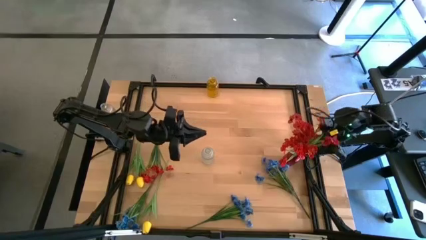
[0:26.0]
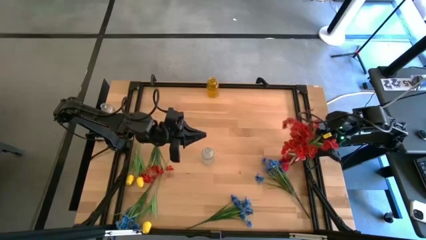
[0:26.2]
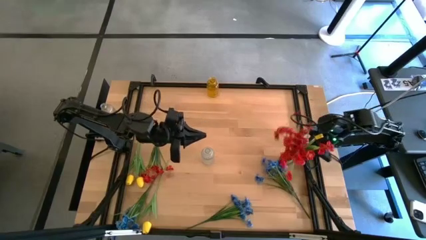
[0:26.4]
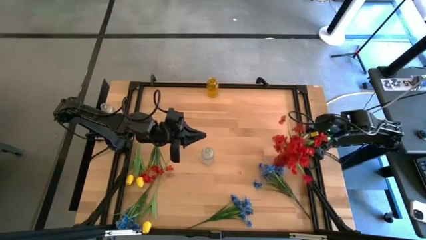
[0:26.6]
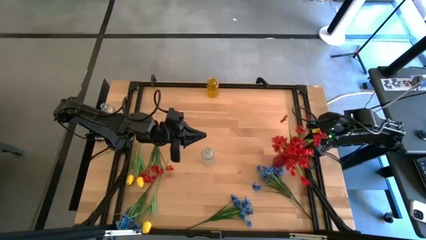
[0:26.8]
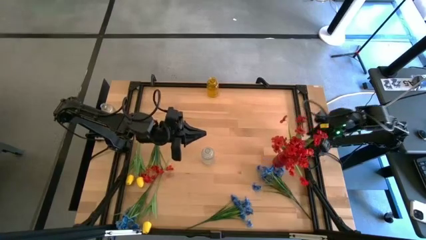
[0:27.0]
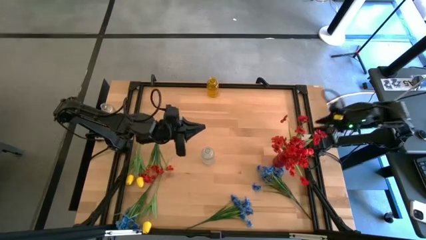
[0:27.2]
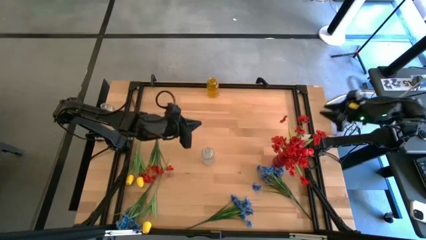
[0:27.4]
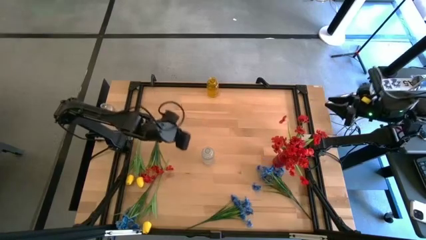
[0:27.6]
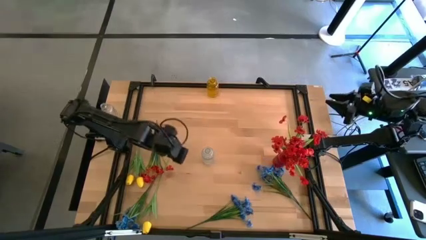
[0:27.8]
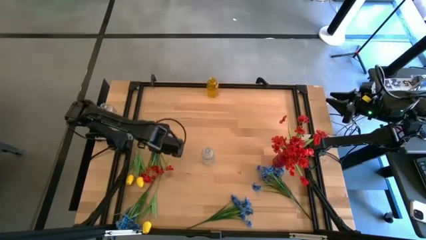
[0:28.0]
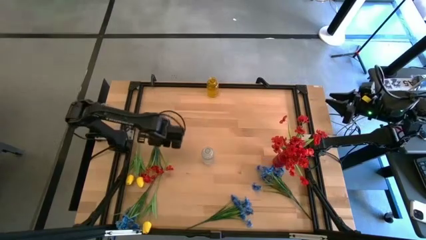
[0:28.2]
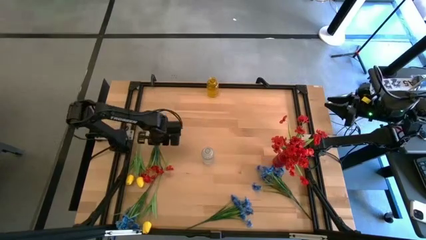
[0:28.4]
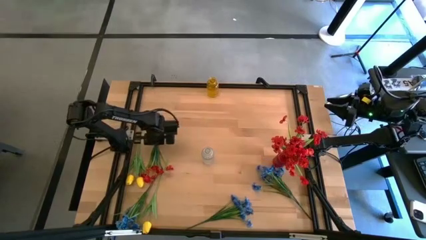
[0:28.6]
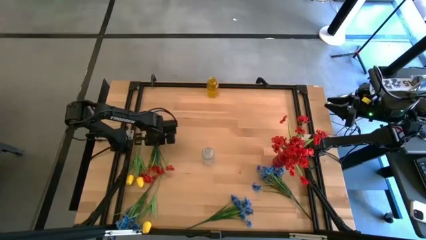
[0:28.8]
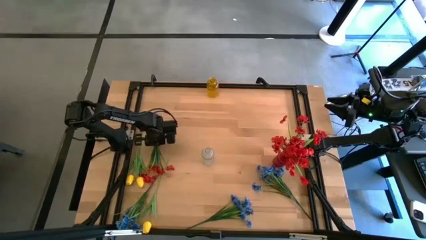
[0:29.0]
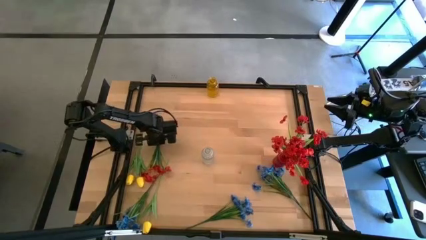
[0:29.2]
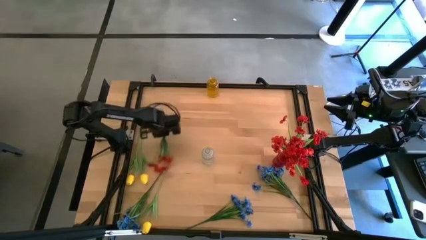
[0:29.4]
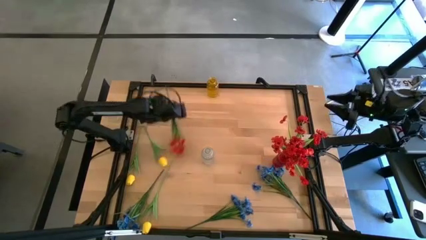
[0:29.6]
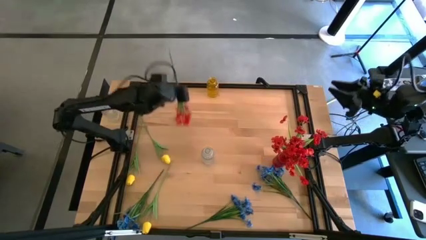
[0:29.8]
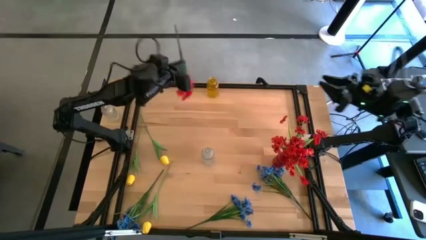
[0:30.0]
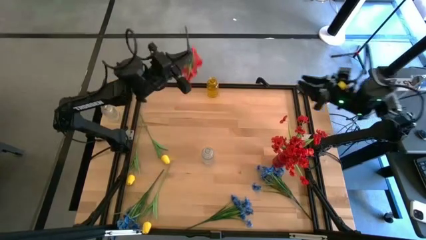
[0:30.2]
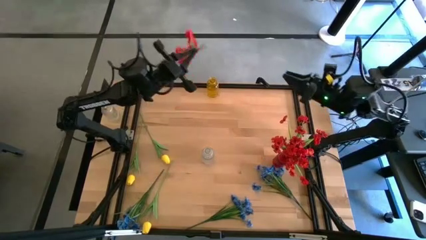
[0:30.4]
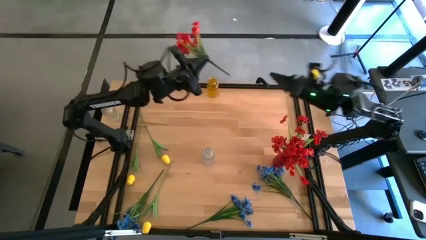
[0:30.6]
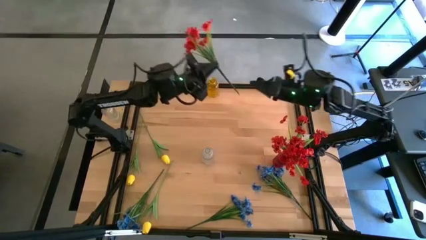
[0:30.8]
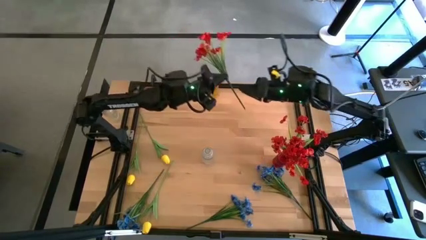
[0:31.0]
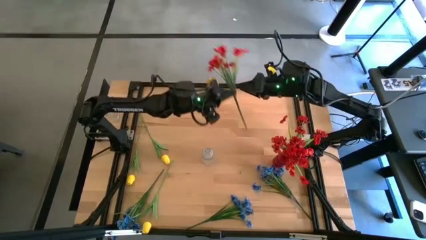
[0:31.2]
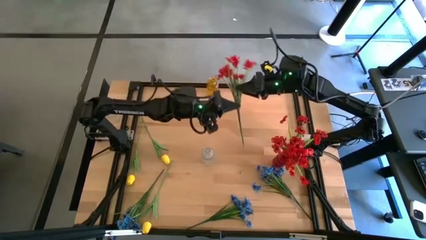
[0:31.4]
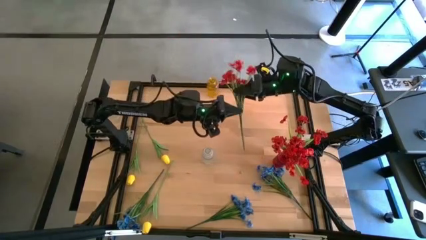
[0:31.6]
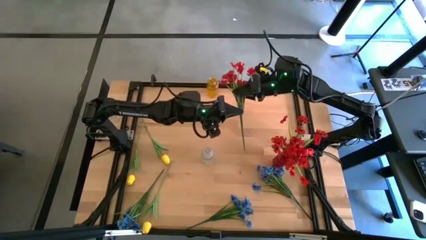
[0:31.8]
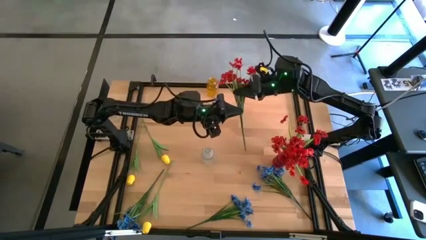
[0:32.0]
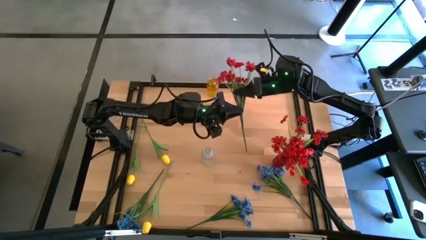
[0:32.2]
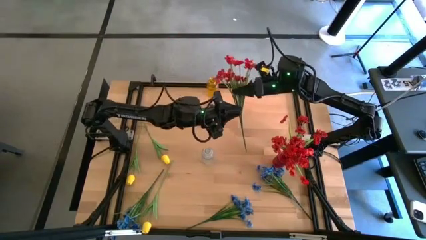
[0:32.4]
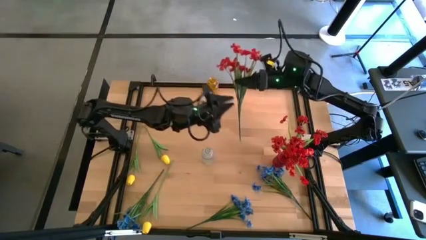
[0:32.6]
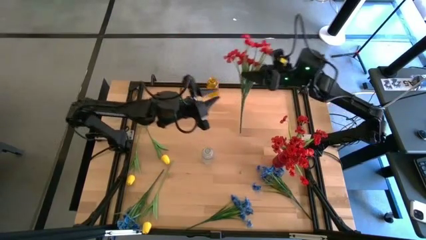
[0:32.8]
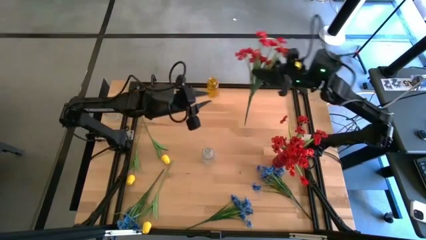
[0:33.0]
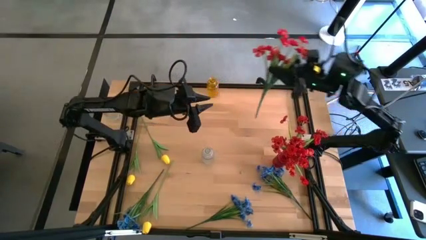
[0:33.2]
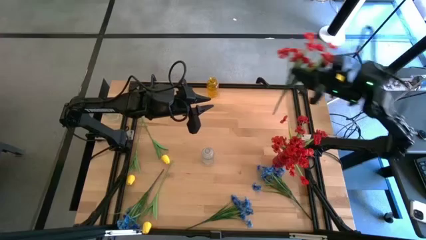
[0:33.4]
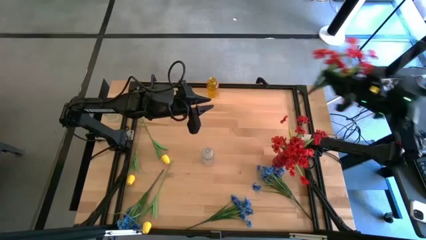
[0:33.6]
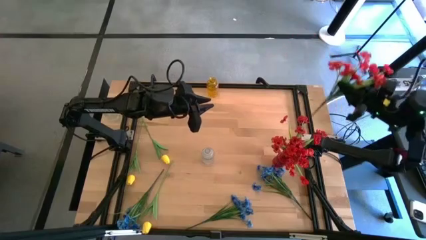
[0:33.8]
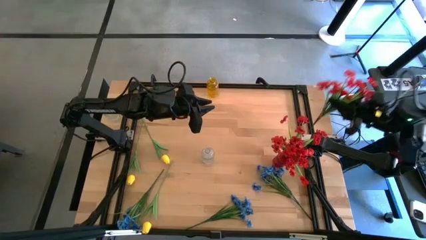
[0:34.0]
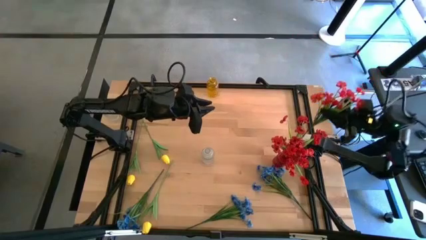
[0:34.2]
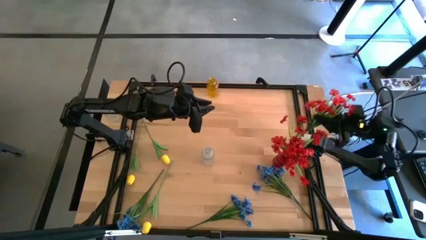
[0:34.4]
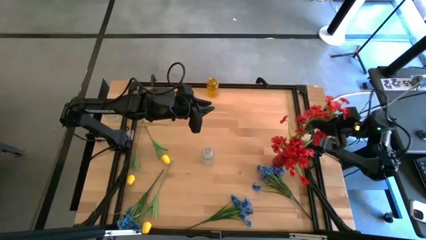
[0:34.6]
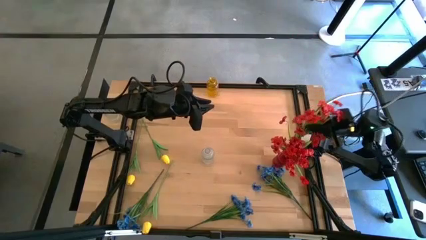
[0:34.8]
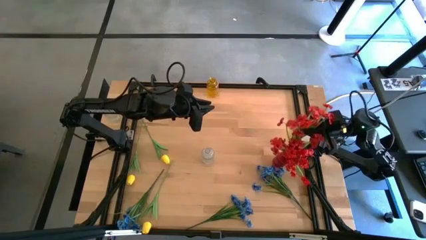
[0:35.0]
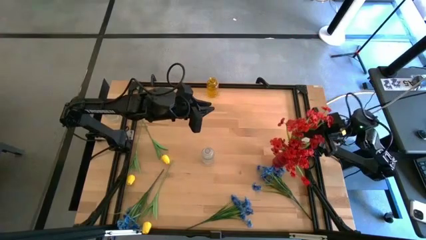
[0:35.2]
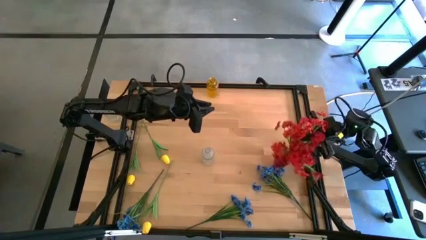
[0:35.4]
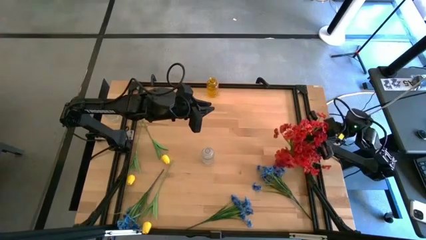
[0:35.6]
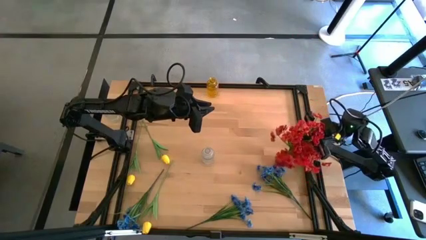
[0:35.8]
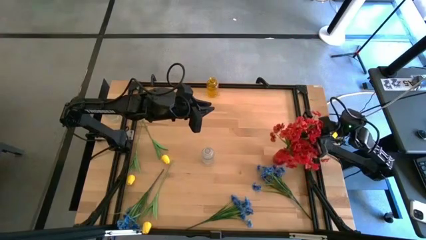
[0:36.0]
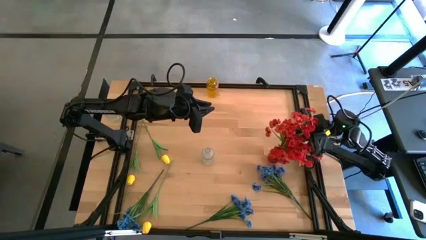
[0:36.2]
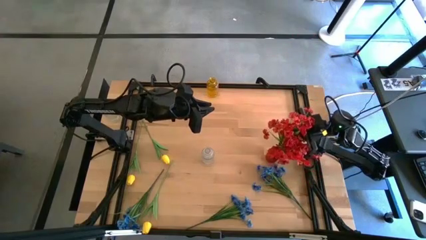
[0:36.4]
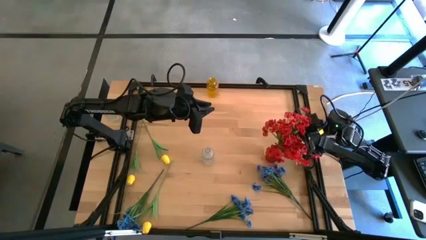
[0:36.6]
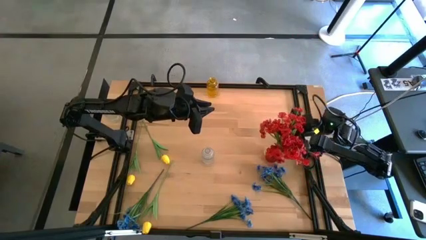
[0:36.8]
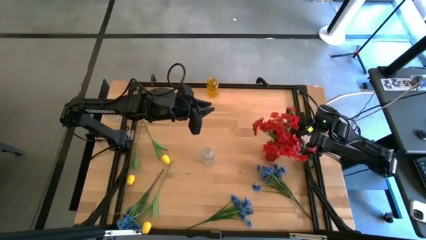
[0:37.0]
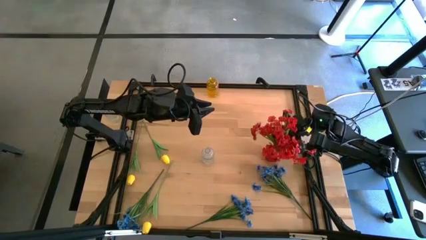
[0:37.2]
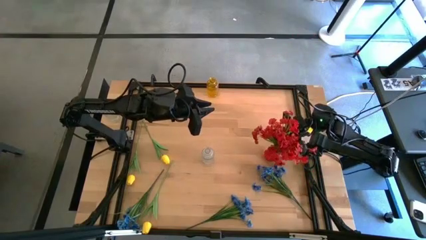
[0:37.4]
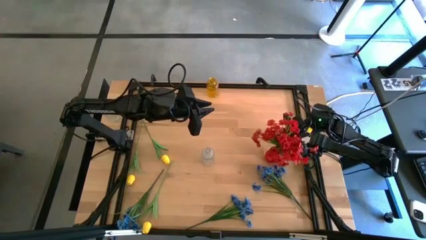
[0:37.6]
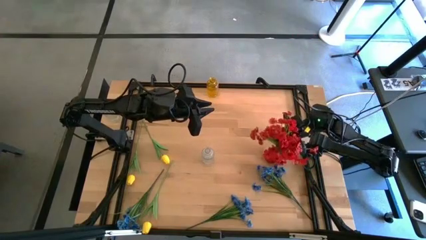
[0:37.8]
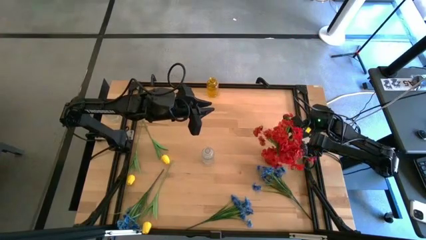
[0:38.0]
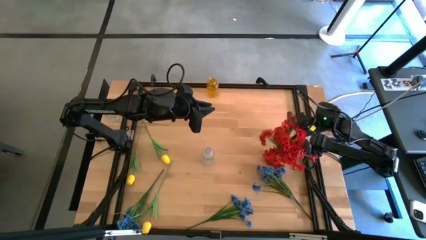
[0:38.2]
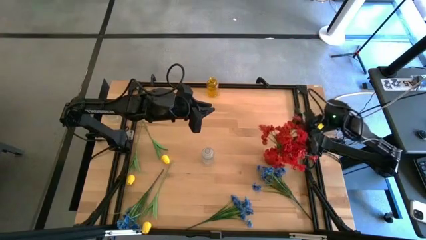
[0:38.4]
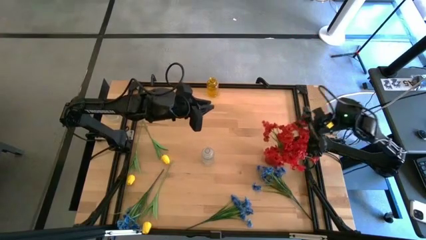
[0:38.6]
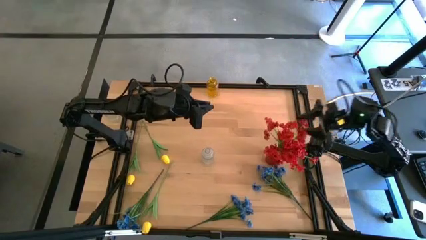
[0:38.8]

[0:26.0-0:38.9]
Task: Sort flowers into vase by color
Put the red flowers into the red vase

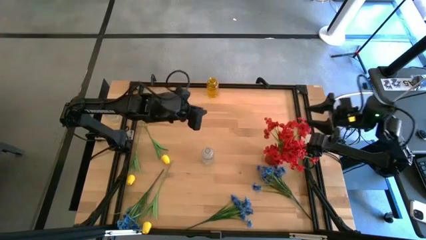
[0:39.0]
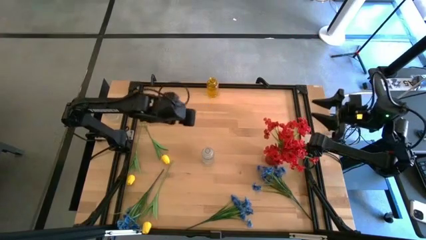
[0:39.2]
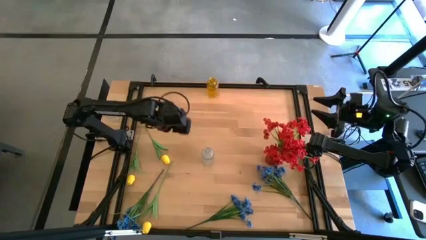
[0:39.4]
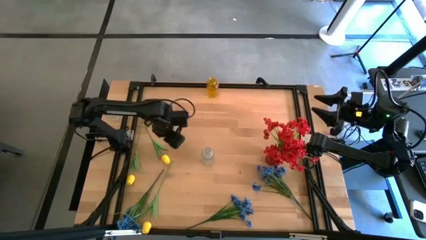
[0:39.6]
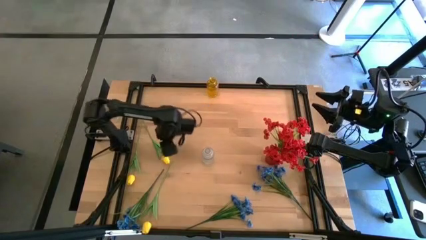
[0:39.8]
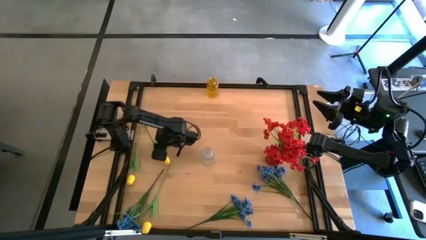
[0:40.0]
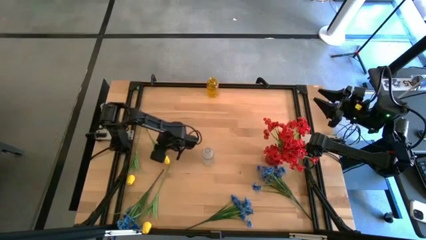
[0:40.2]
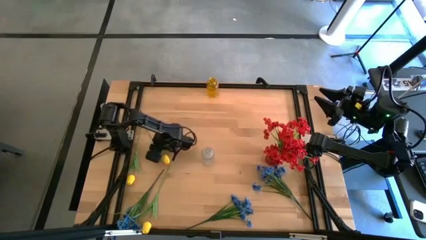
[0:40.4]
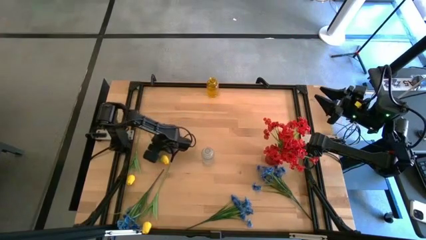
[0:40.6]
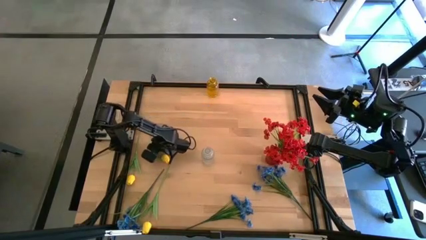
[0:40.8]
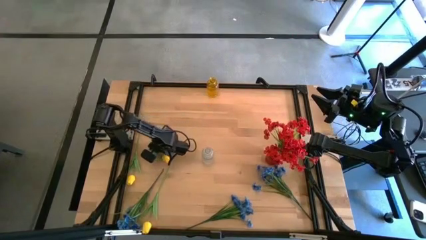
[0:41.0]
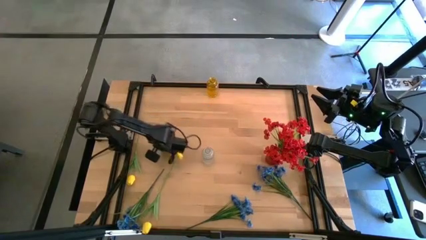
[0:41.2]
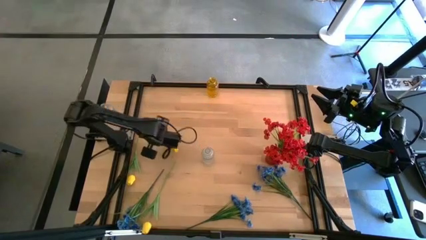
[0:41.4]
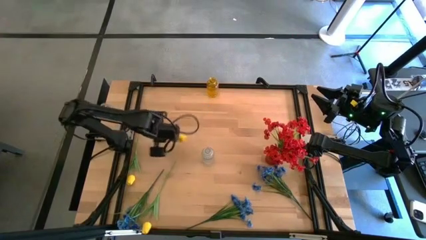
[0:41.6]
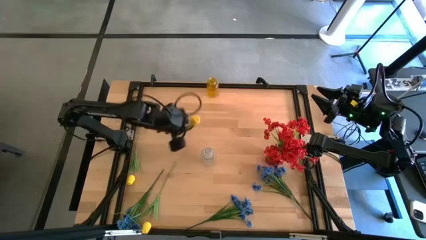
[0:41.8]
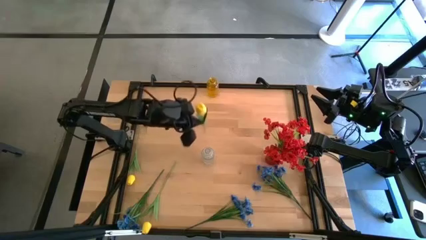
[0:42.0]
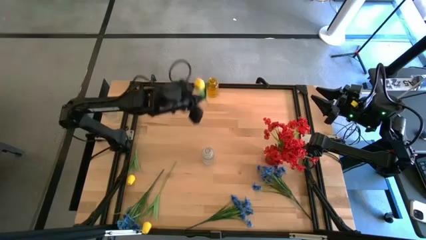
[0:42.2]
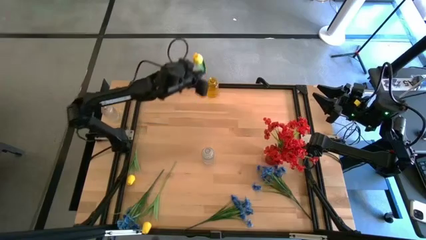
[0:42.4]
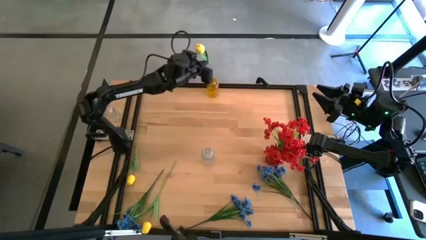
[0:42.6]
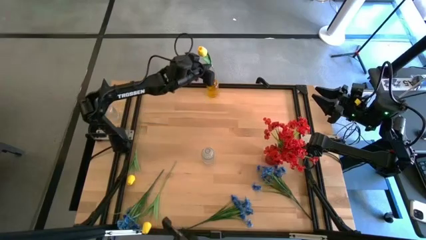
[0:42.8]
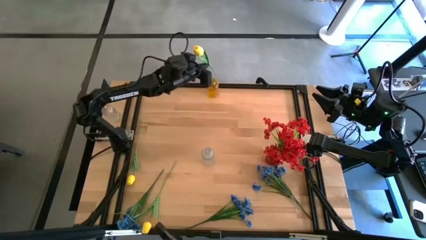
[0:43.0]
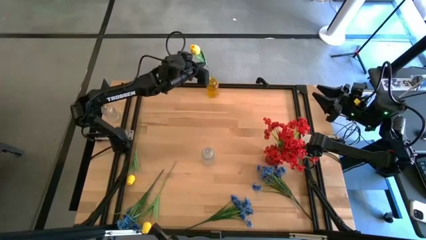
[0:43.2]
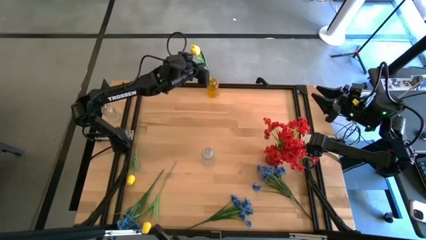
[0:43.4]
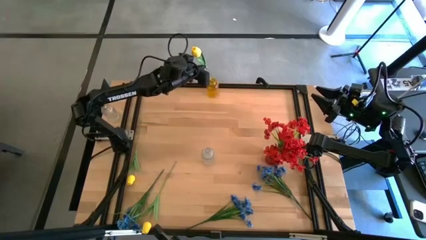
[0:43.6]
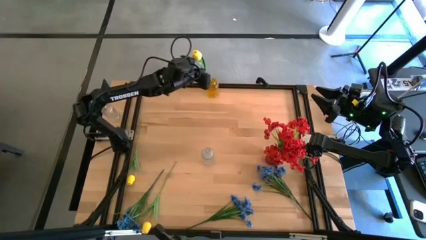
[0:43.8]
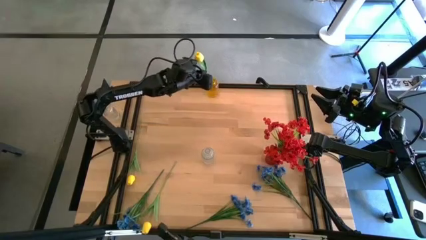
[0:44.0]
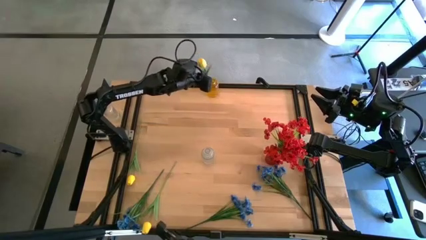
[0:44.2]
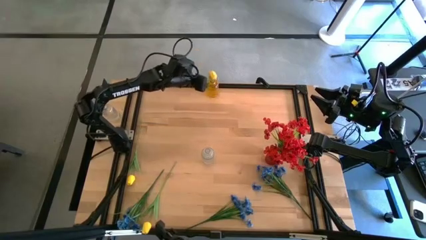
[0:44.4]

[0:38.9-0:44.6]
Put the top yellow tulip into the yellow vase
